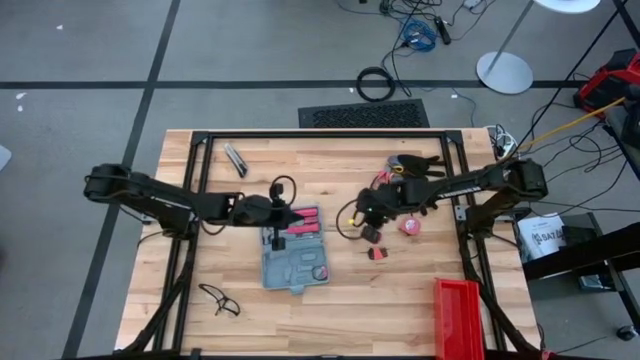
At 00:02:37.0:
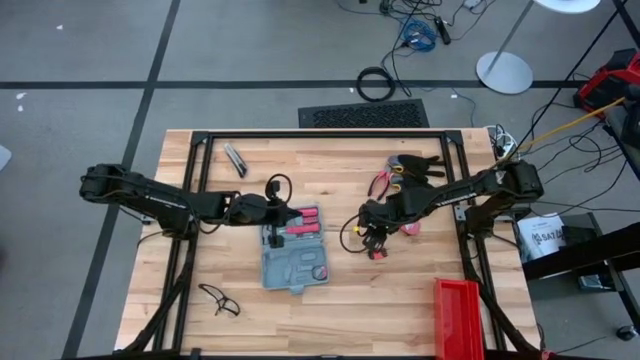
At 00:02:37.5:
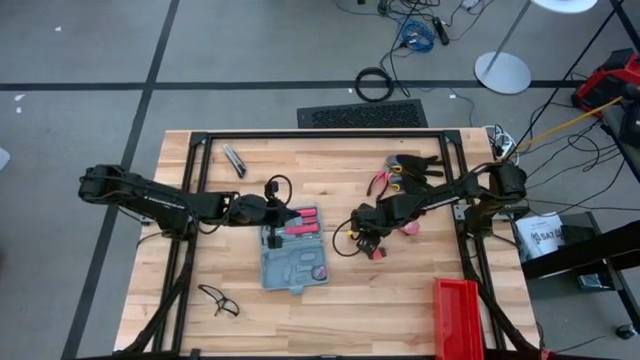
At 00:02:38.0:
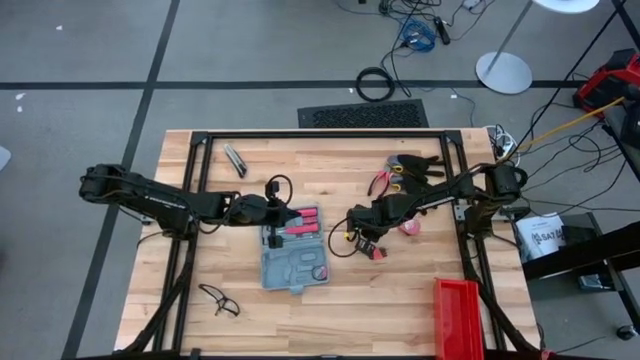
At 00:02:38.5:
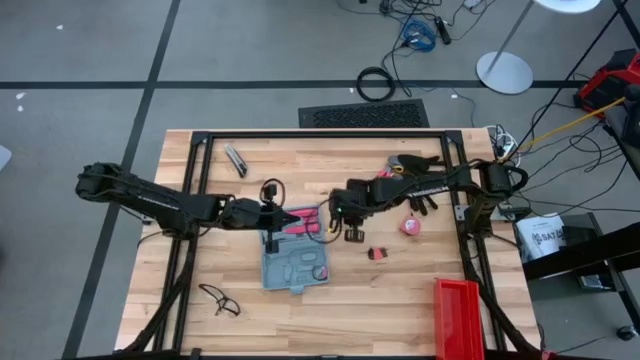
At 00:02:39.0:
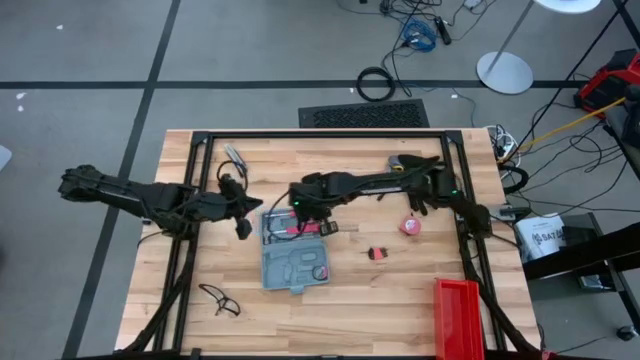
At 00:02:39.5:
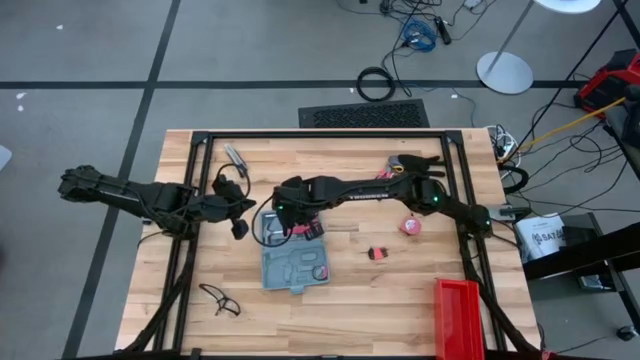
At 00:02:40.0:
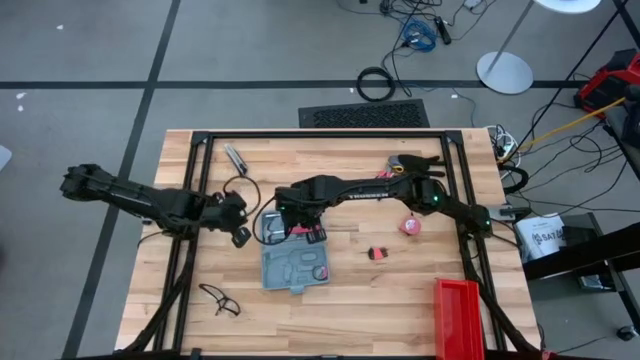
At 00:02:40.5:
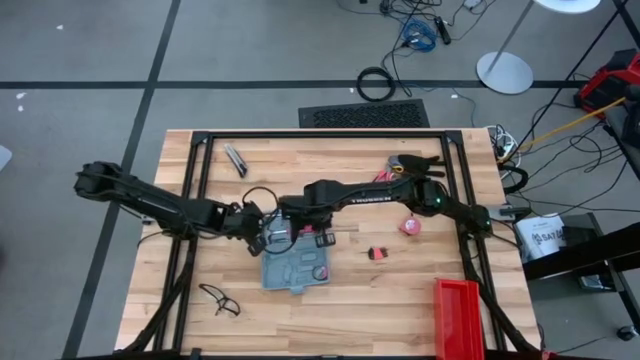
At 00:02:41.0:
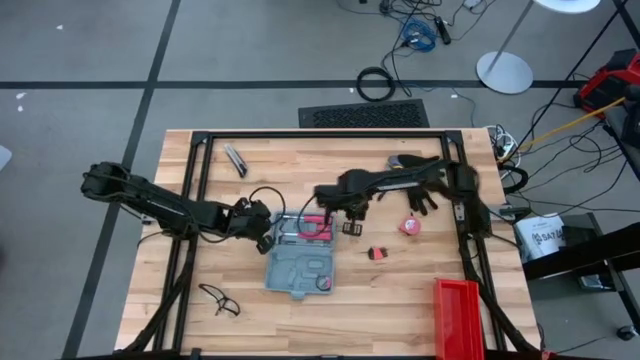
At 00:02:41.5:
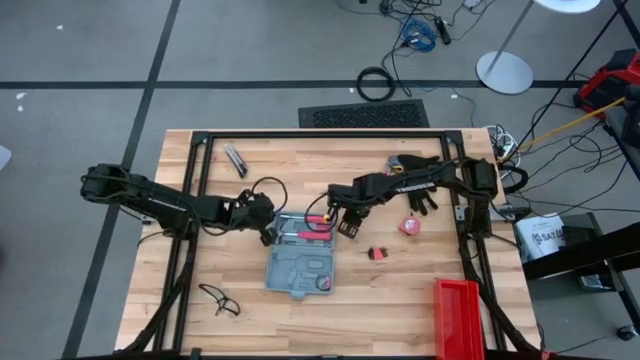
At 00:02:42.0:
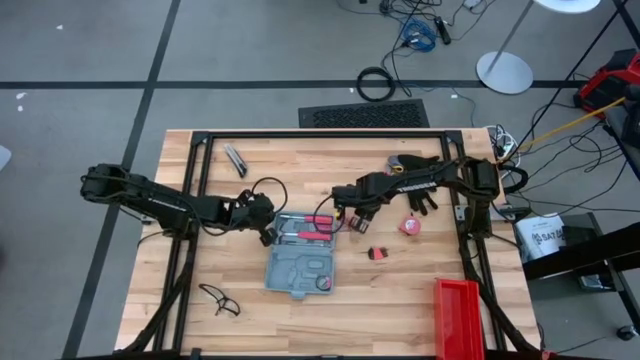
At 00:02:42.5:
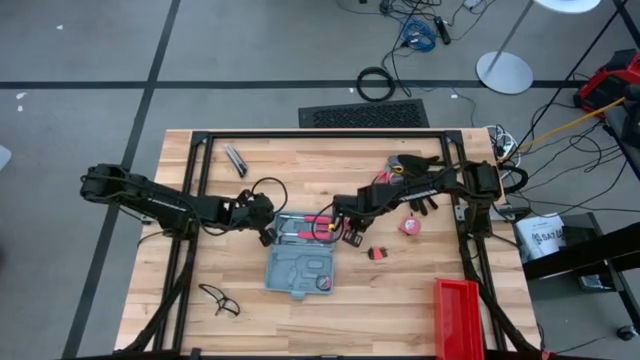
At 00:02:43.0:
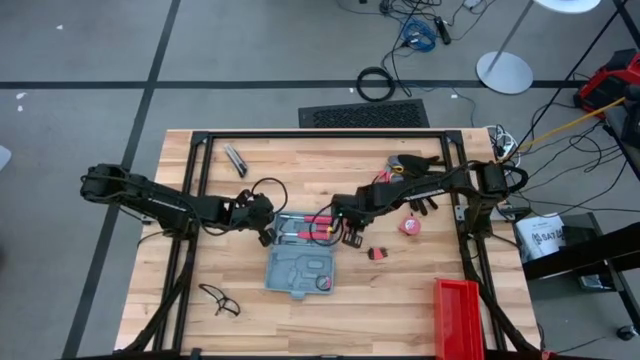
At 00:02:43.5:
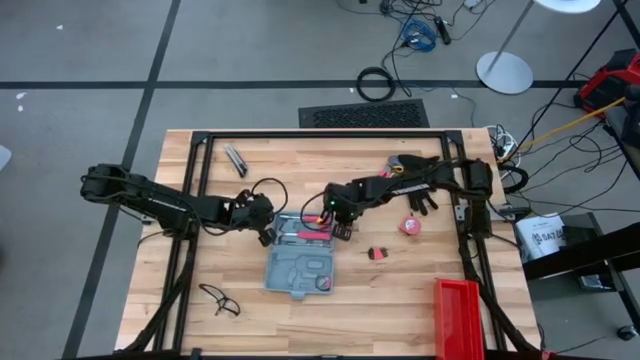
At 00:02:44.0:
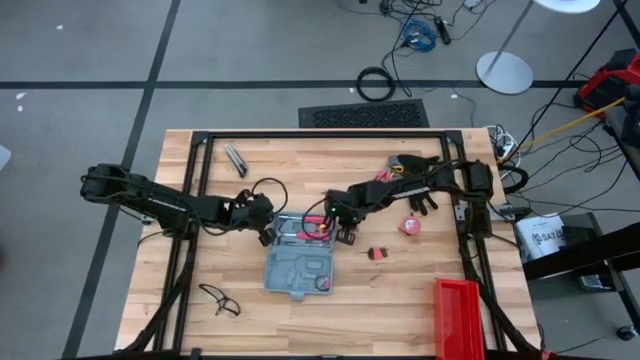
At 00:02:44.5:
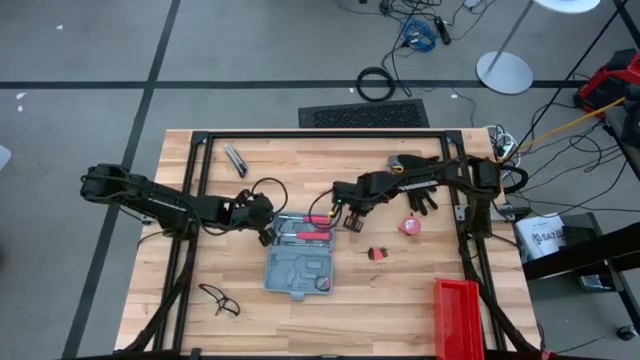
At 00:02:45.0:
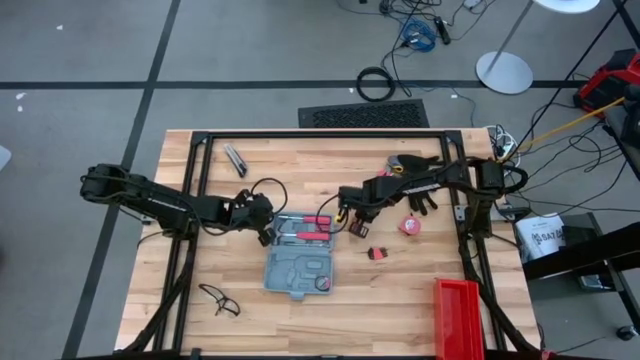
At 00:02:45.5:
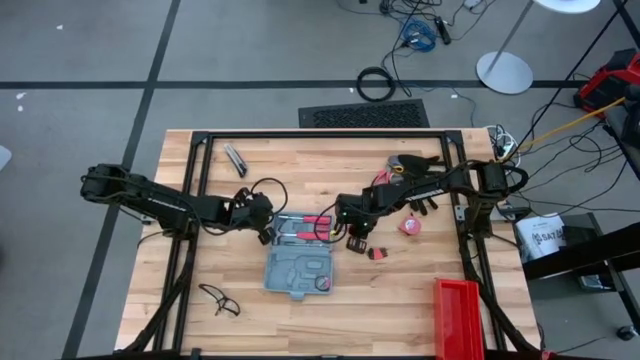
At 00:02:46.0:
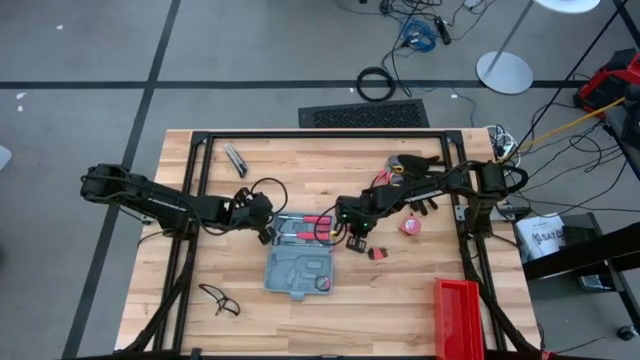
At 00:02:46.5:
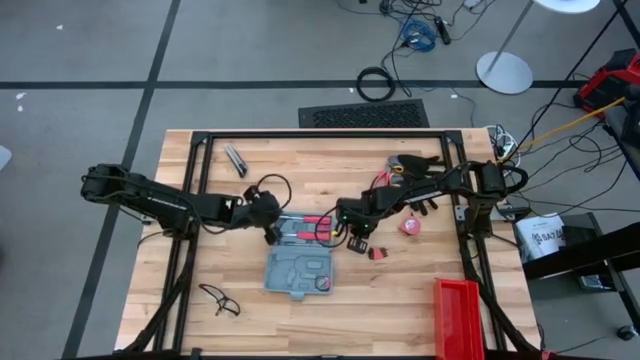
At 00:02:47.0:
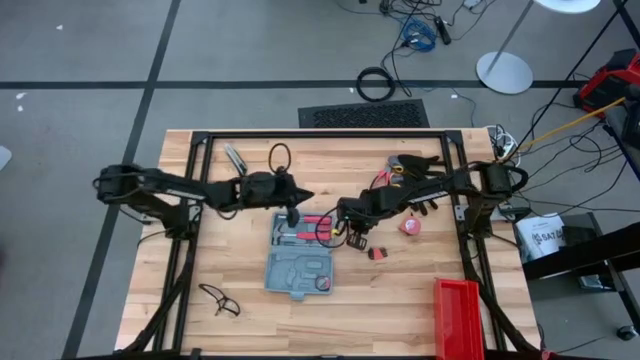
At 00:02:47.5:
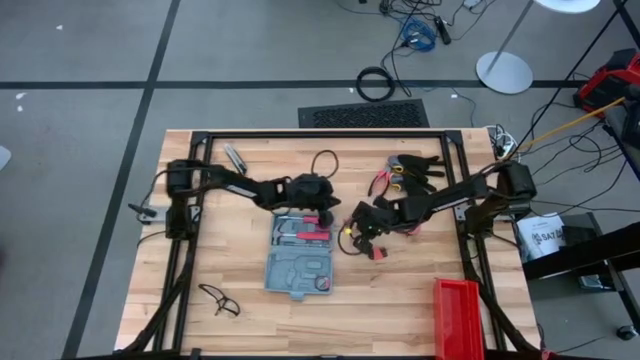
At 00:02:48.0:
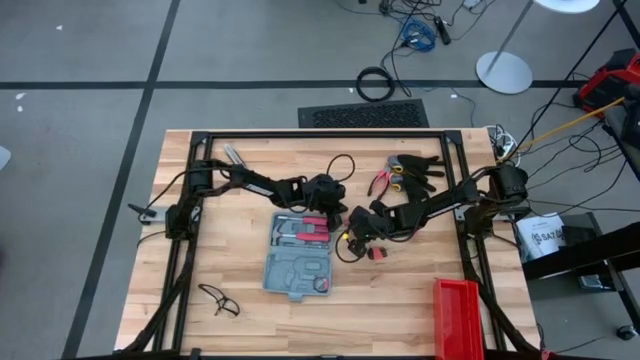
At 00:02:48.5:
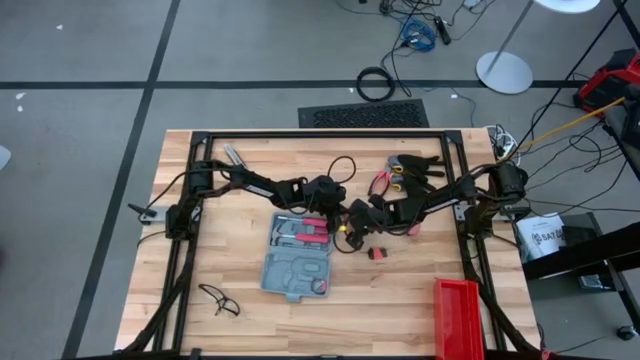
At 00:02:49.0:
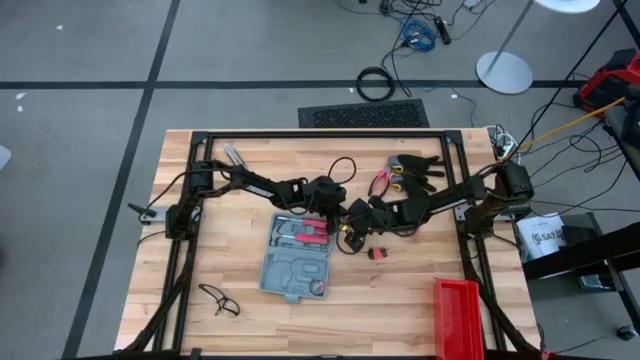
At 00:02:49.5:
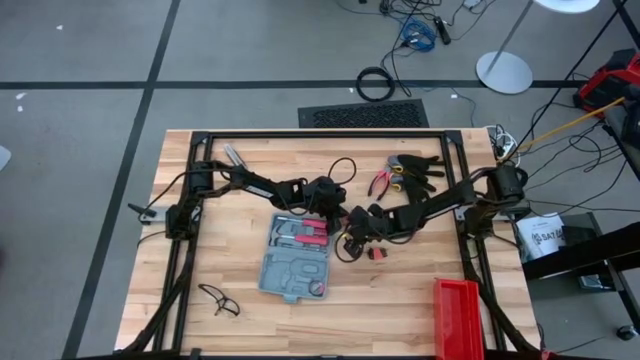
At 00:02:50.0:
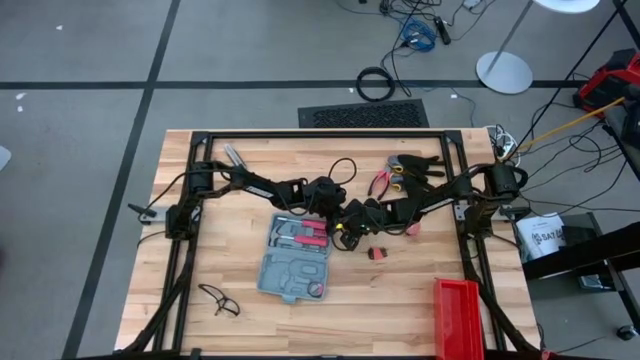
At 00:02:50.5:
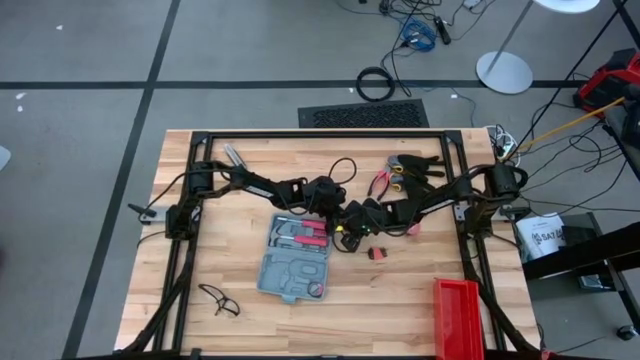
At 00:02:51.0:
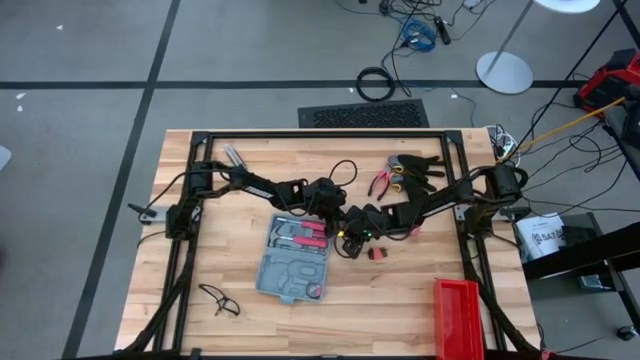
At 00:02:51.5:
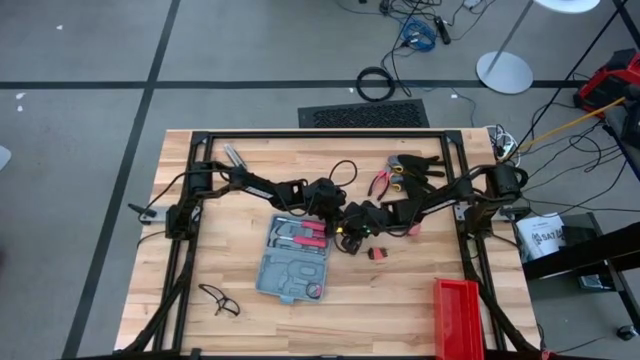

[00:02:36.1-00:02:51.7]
Task: prefit tool cases
Adjust the pink terminal block

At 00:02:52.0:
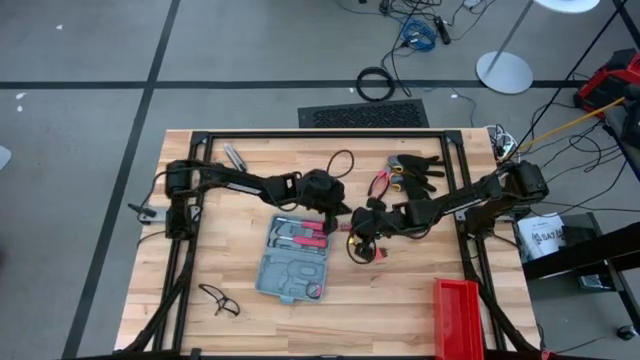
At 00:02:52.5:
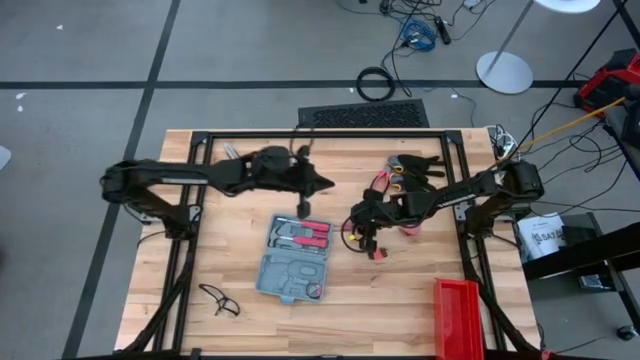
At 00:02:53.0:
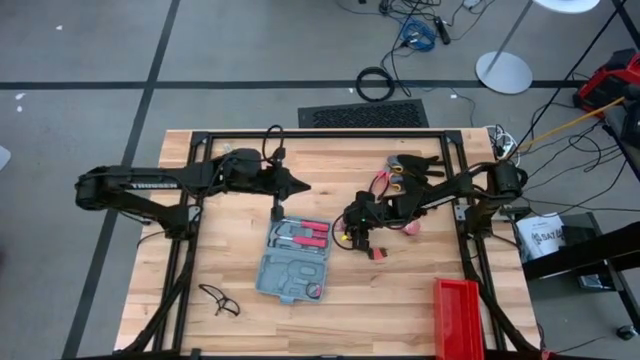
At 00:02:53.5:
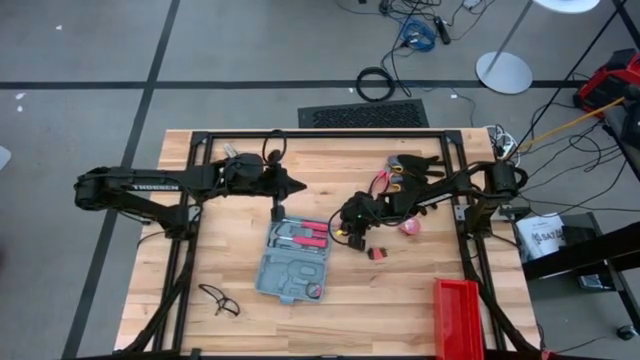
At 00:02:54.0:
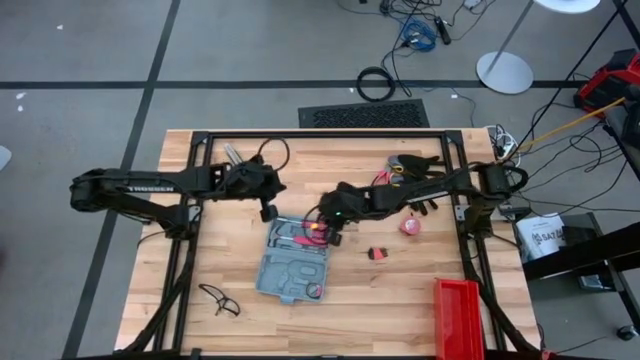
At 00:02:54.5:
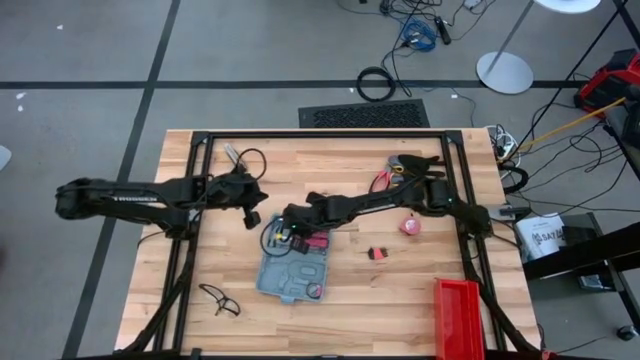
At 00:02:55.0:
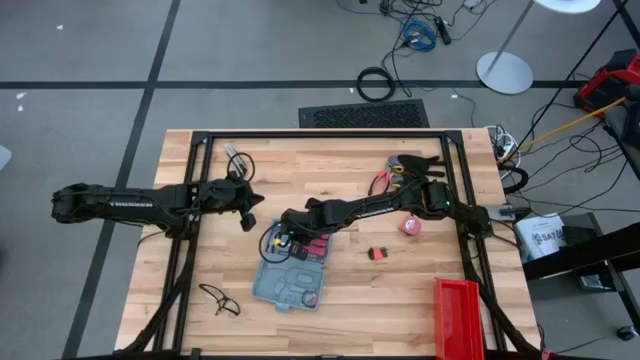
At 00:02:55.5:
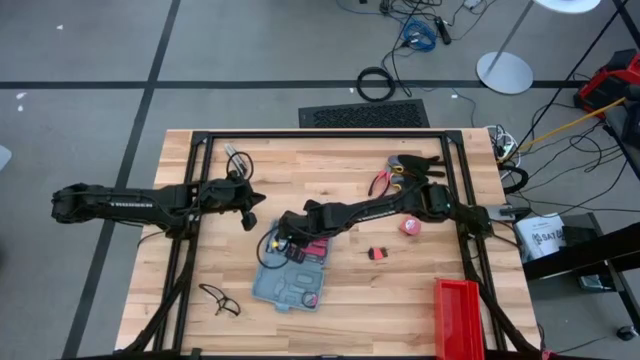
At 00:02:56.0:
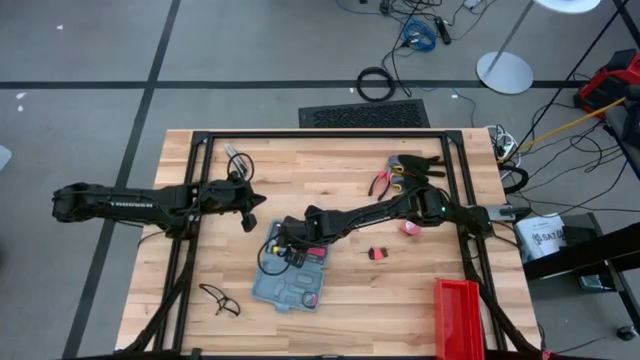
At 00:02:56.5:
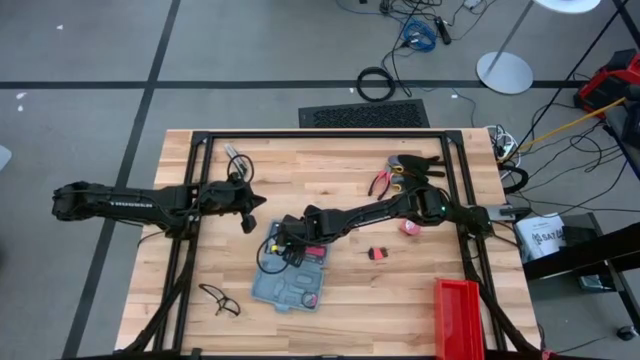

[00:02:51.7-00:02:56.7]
Put the pink terminal block into the gray prefit tool case
